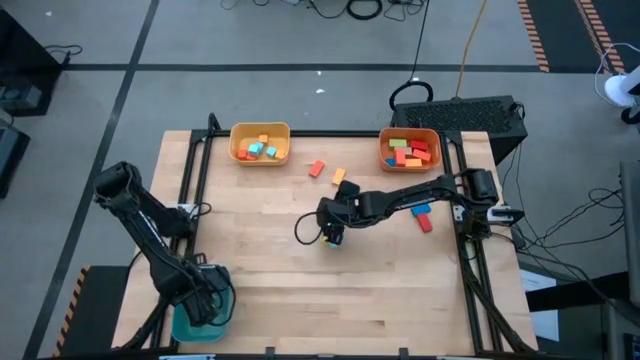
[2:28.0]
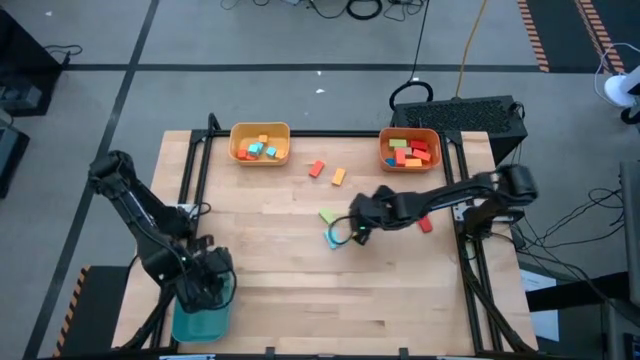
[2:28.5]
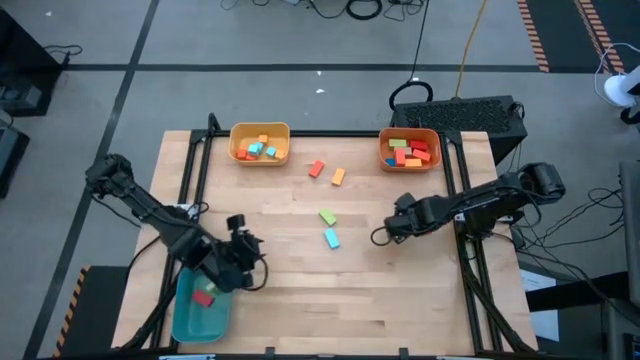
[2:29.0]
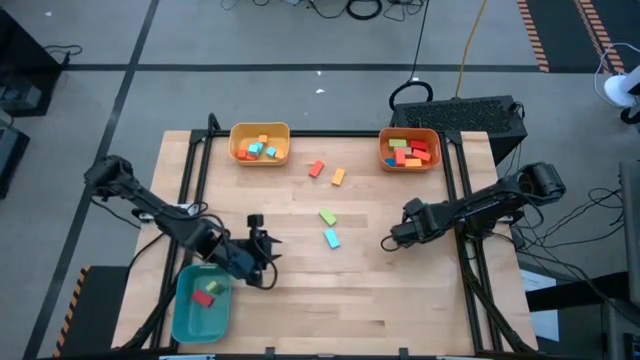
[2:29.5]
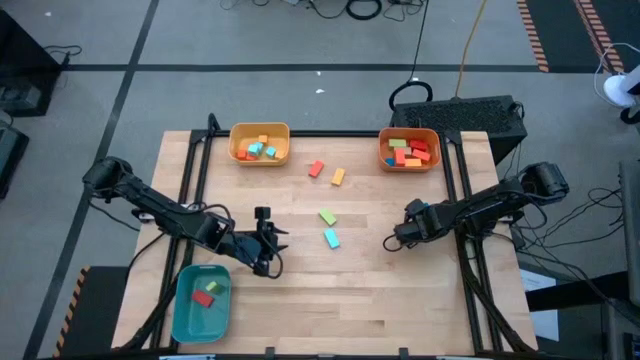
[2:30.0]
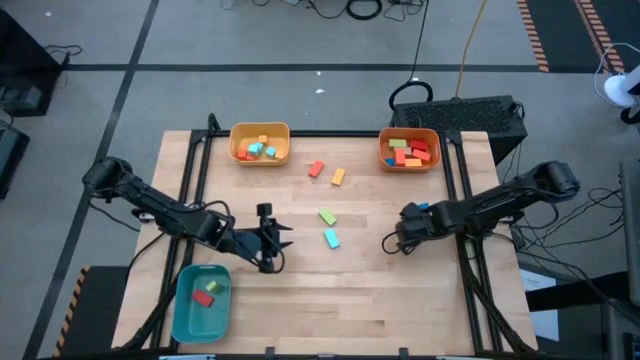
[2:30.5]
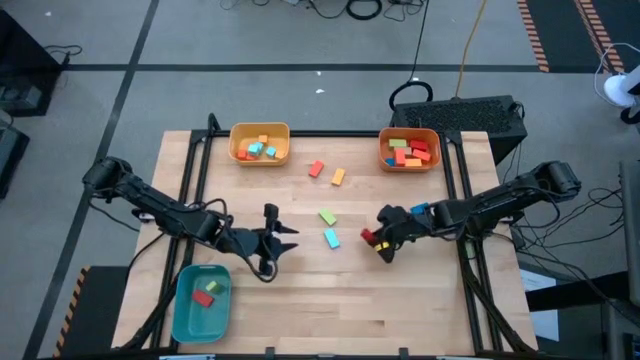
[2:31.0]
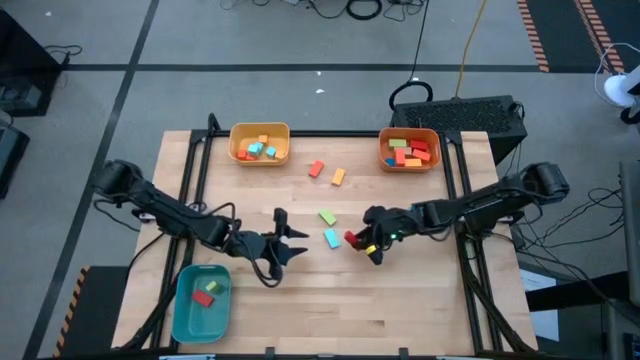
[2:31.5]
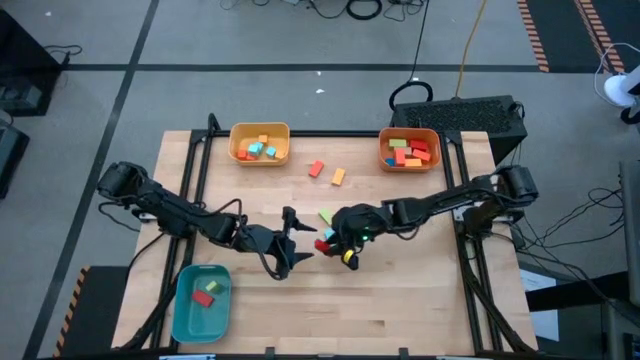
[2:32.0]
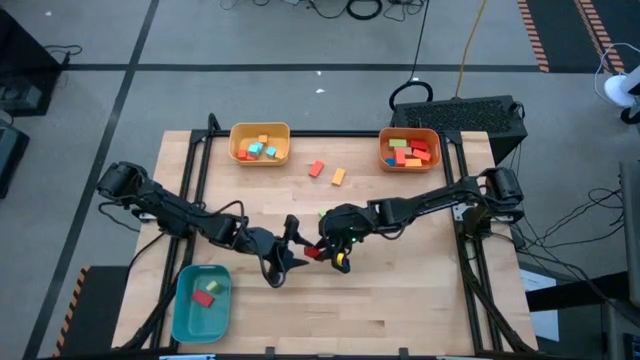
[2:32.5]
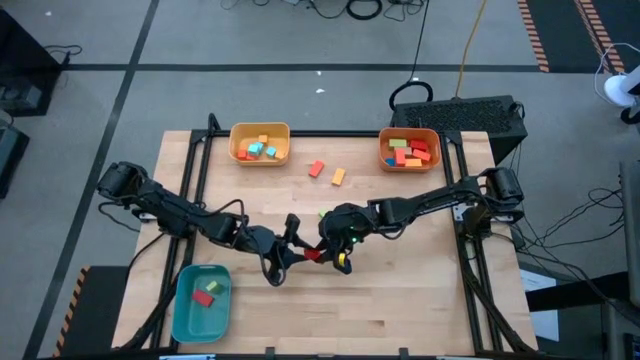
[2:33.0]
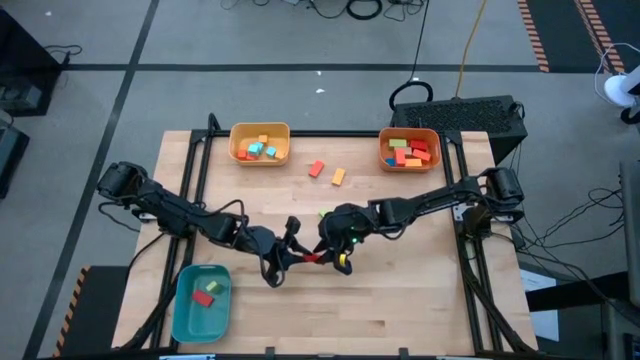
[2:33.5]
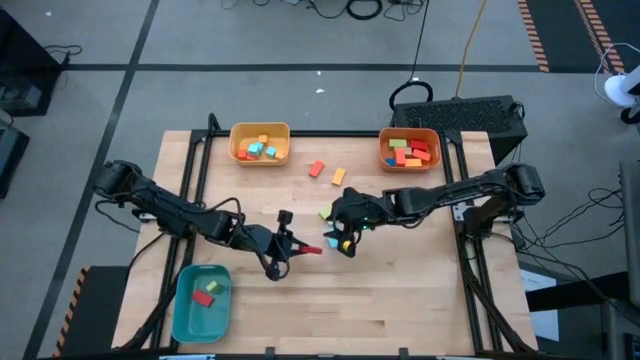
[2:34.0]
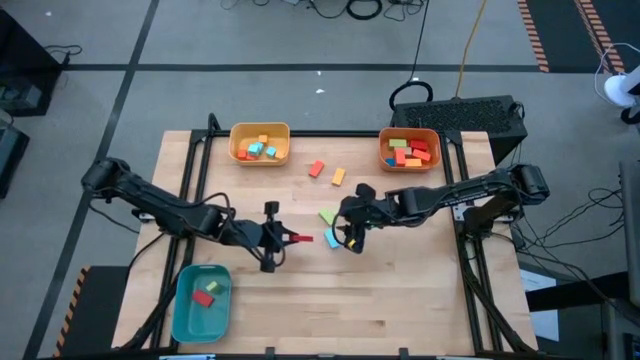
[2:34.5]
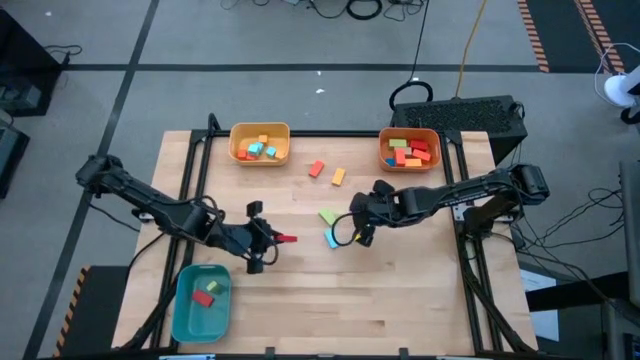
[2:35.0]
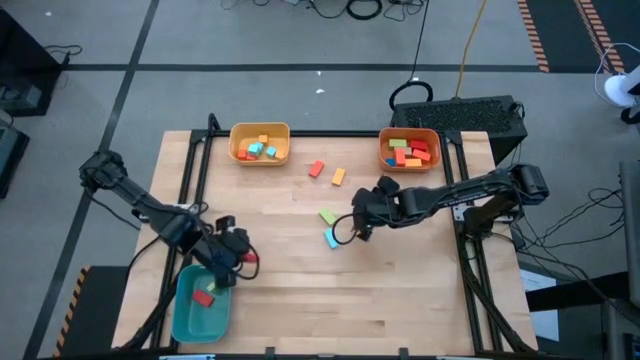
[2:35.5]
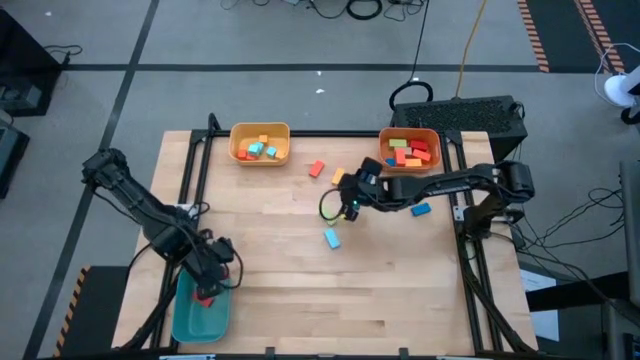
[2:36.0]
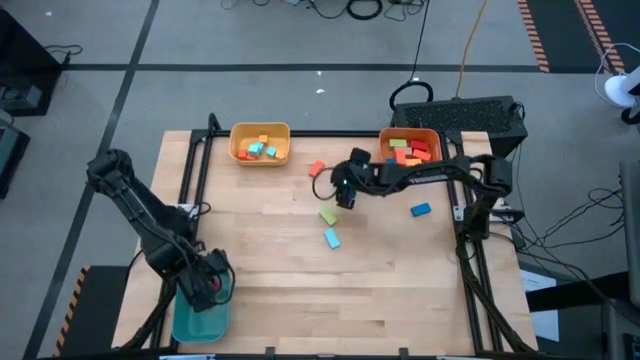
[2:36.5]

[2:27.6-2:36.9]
Task: Sort blocks by size
Put the large red block into the blue bin

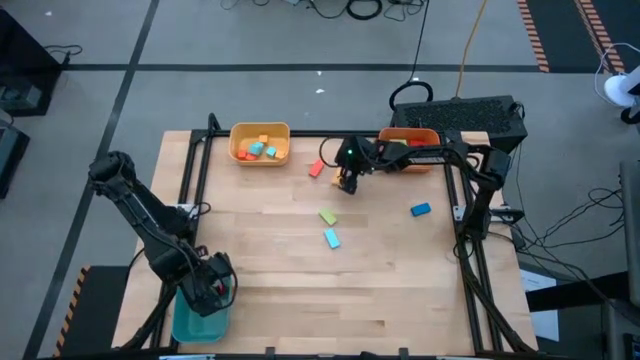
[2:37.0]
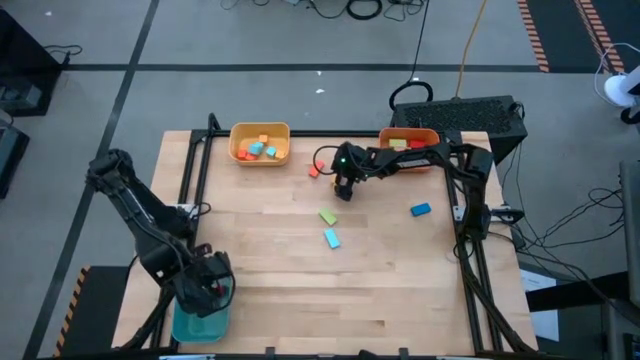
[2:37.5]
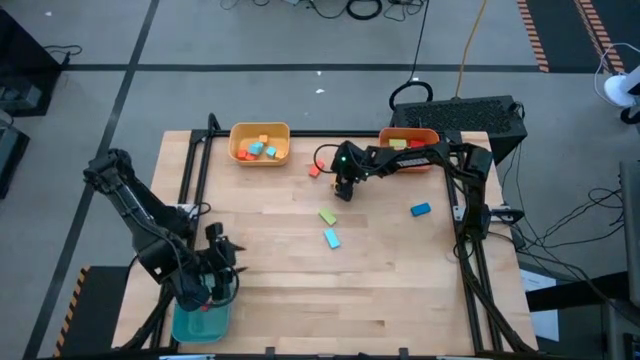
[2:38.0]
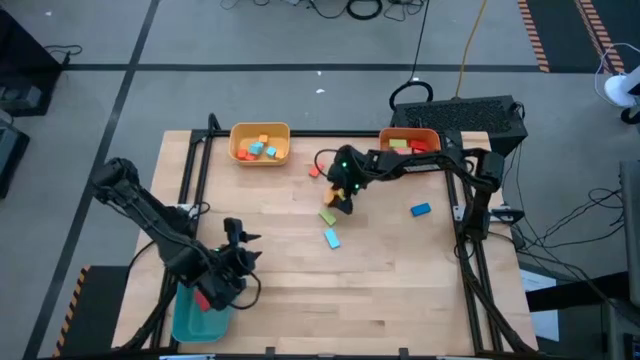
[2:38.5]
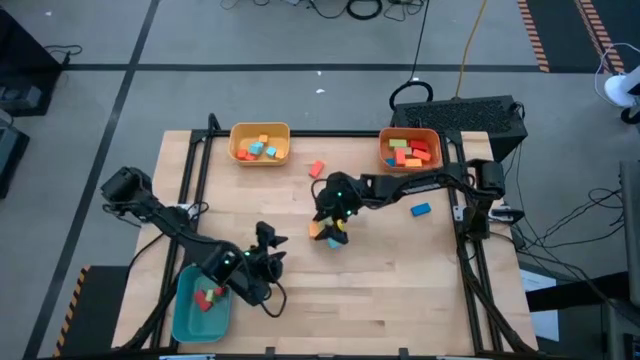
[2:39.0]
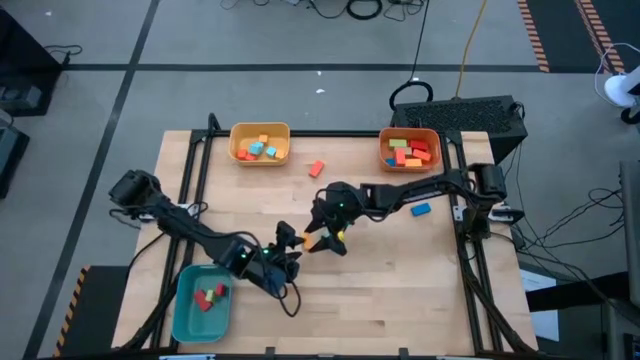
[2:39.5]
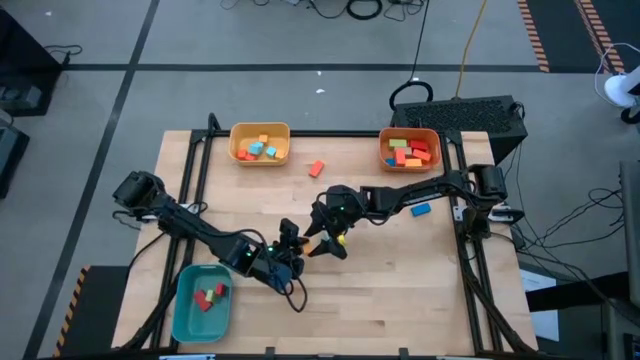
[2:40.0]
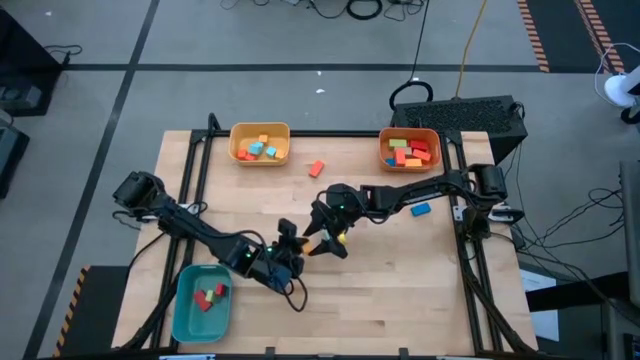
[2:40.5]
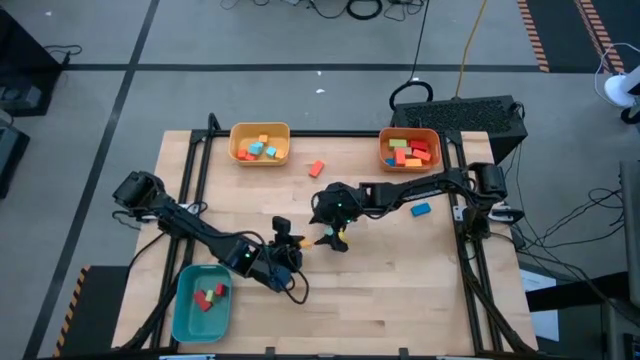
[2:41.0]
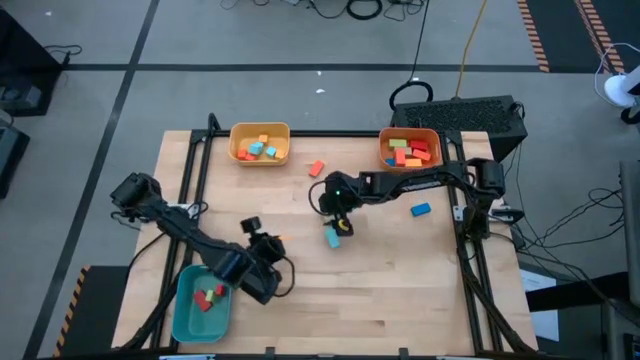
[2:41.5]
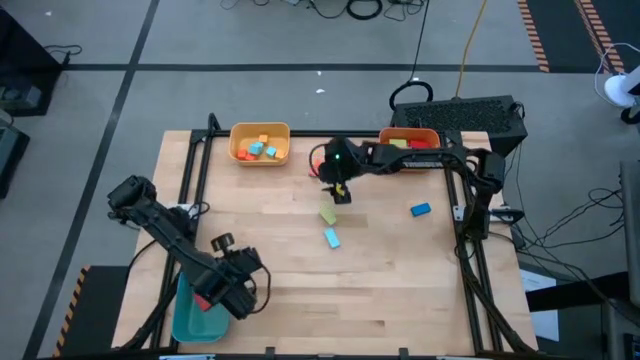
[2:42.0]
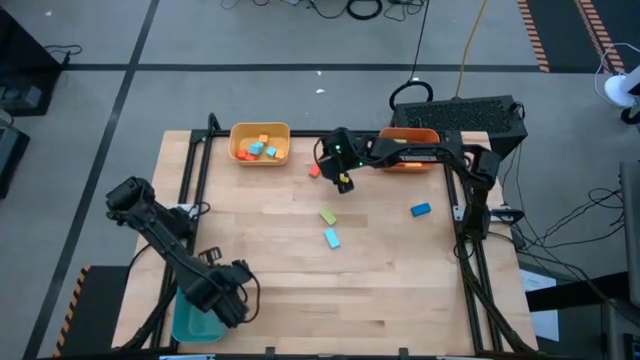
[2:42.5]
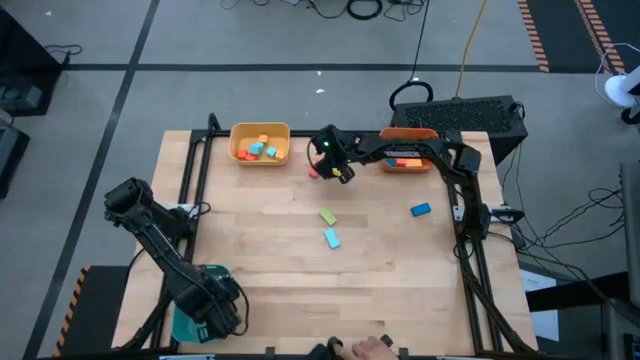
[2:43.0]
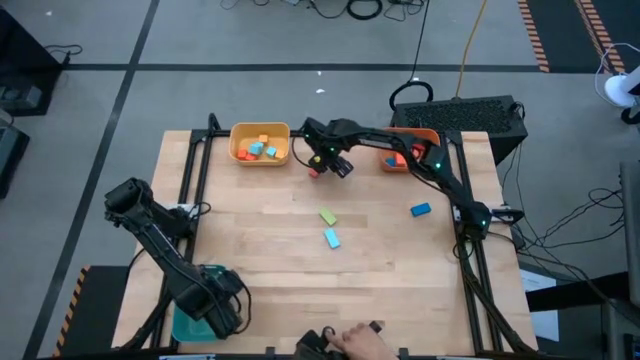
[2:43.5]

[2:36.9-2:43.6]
Put the large yellow block into the blue bin

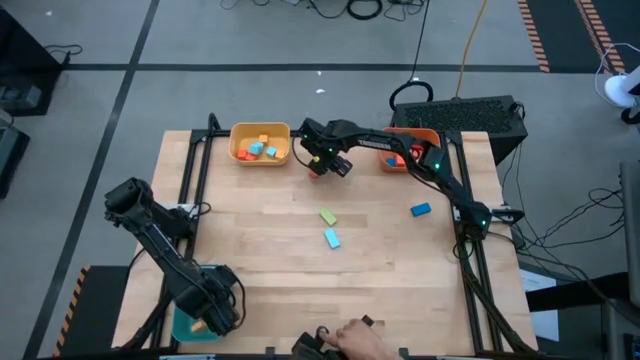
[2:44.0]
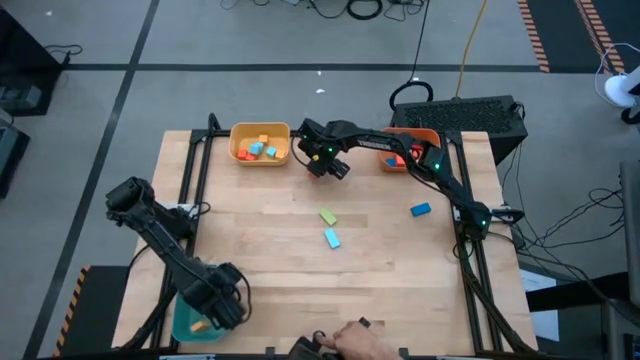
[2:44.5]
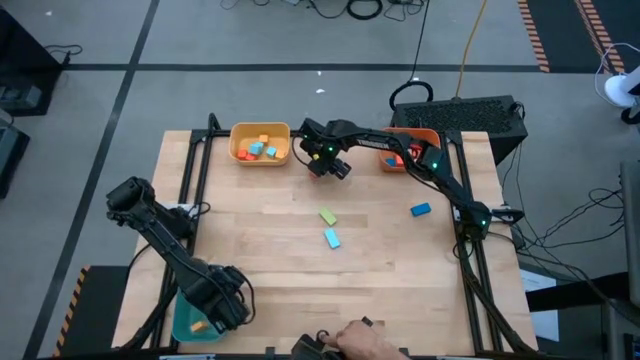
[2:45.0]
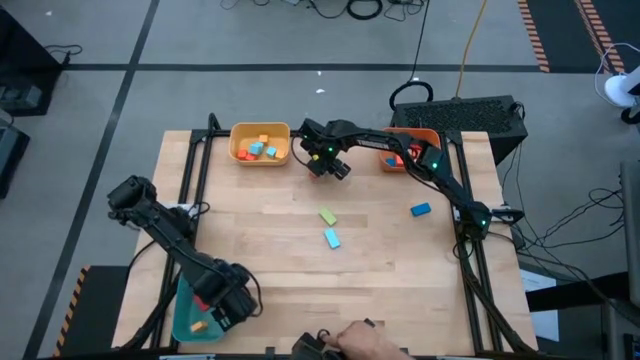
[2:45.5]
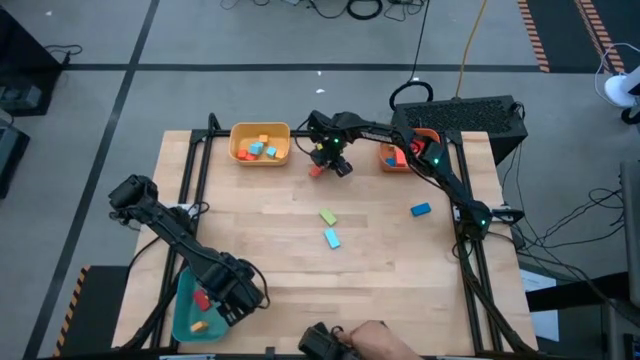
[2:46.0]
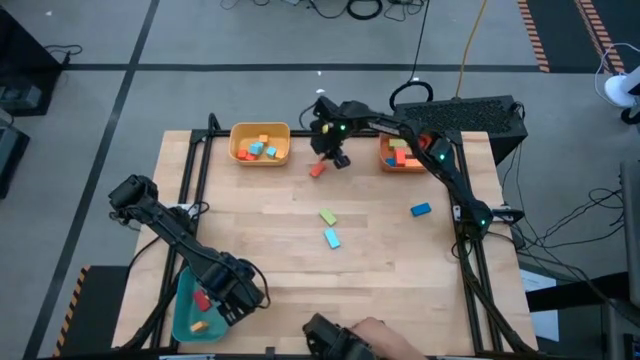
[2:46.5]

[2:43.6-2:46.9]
Put the large orange block into the blue bin
